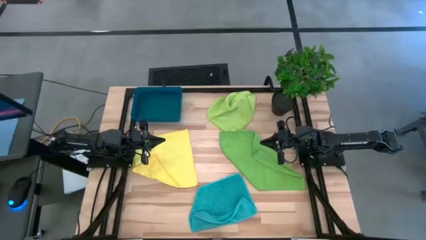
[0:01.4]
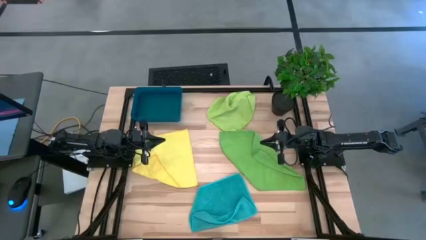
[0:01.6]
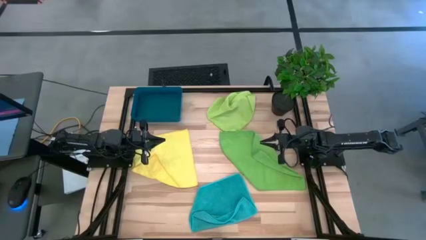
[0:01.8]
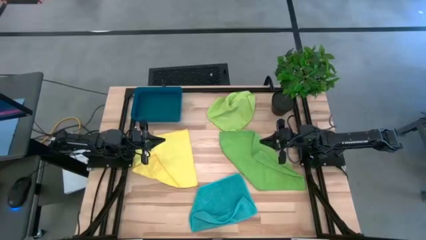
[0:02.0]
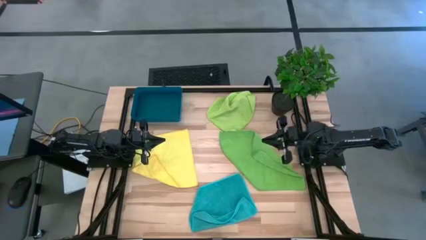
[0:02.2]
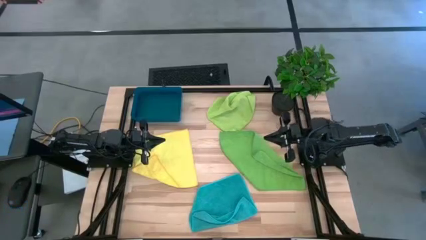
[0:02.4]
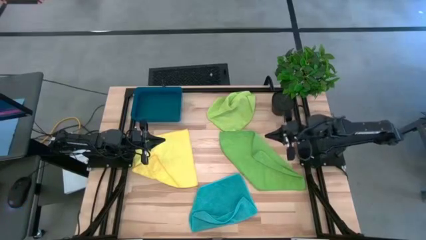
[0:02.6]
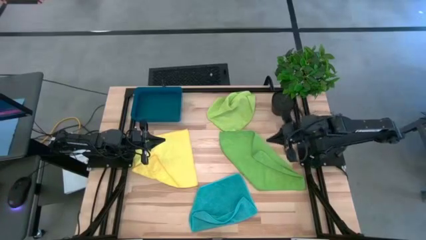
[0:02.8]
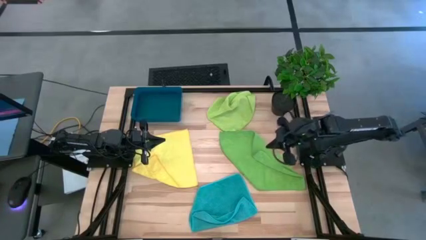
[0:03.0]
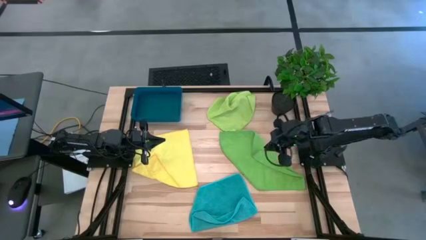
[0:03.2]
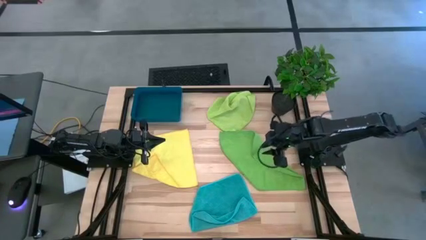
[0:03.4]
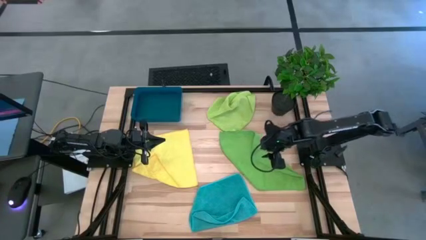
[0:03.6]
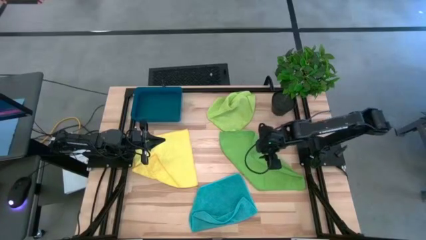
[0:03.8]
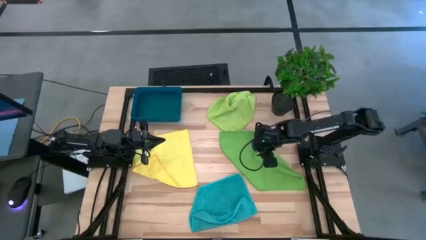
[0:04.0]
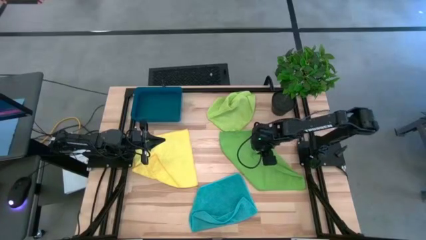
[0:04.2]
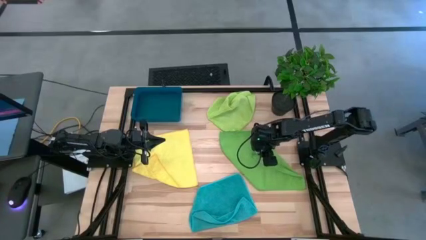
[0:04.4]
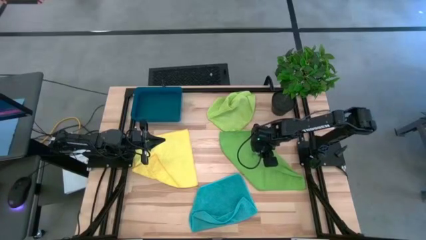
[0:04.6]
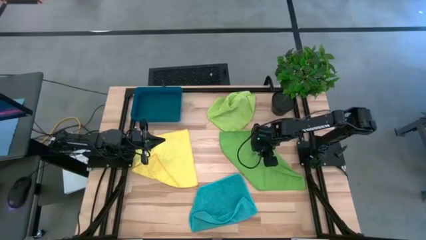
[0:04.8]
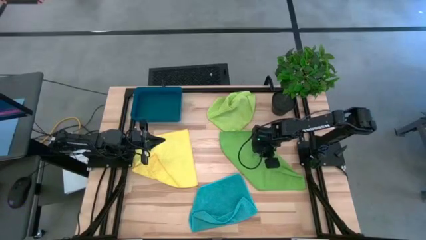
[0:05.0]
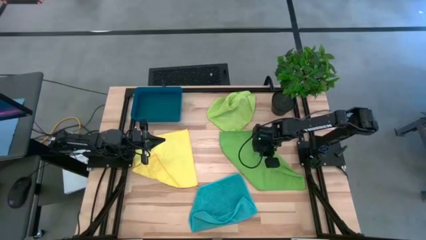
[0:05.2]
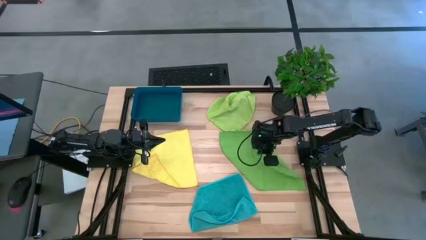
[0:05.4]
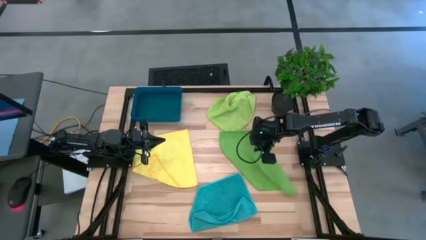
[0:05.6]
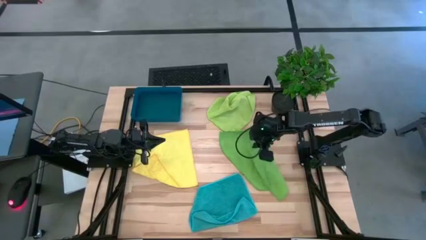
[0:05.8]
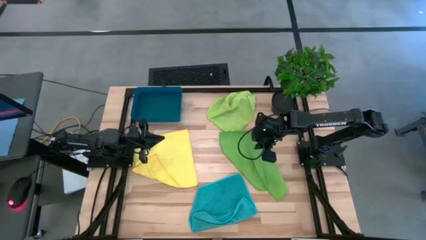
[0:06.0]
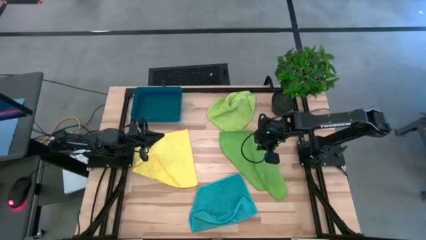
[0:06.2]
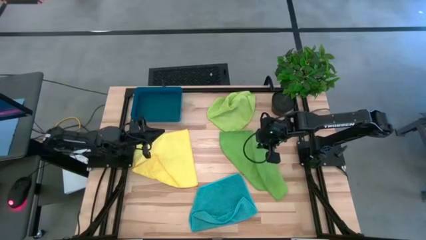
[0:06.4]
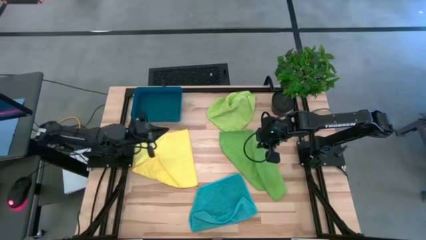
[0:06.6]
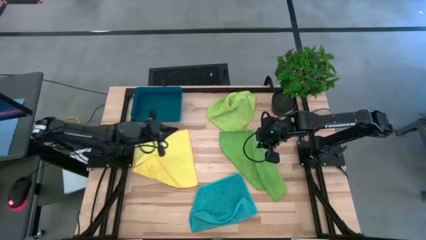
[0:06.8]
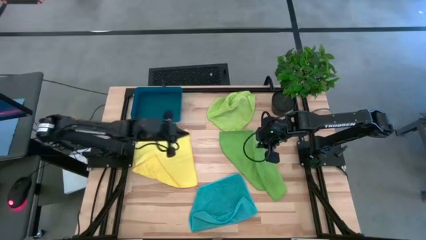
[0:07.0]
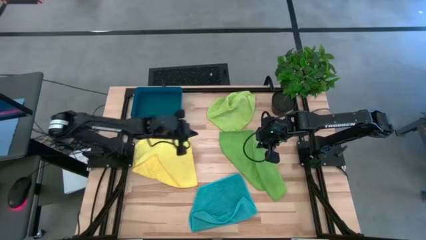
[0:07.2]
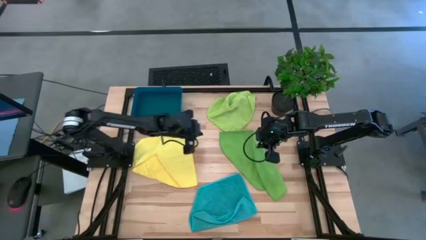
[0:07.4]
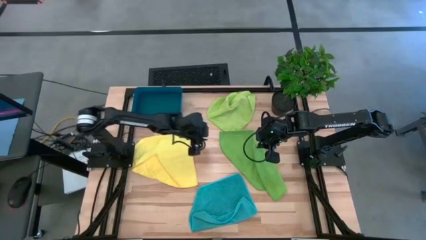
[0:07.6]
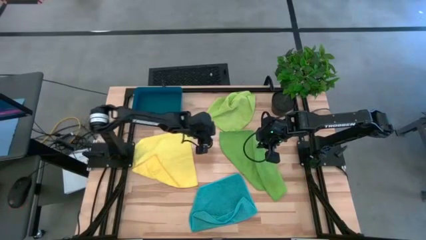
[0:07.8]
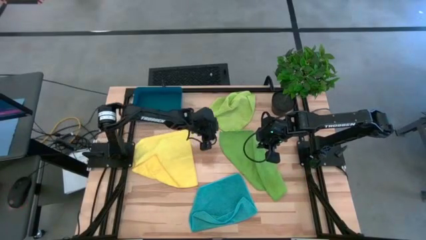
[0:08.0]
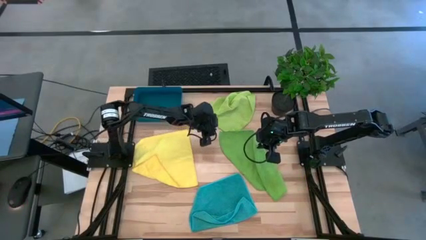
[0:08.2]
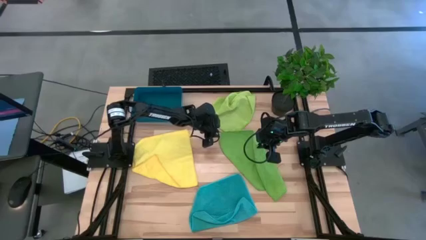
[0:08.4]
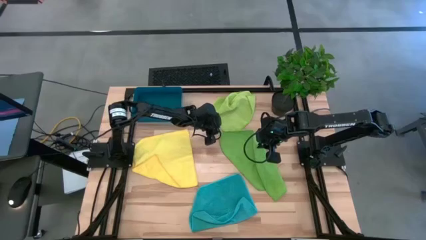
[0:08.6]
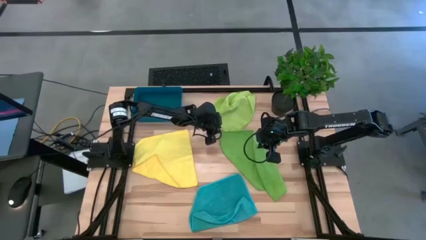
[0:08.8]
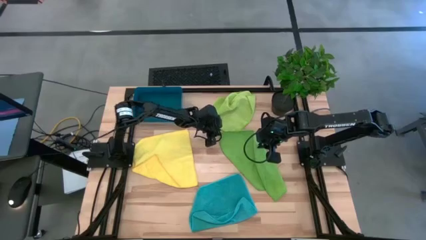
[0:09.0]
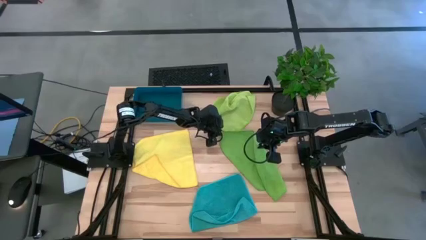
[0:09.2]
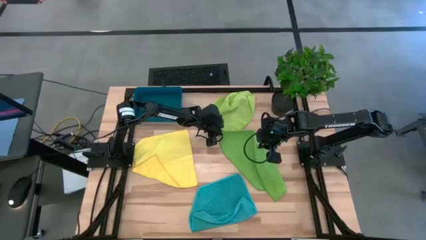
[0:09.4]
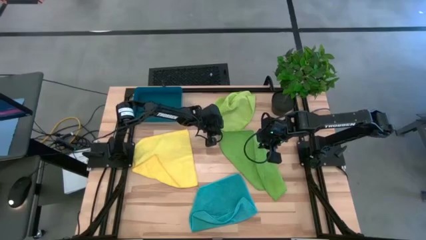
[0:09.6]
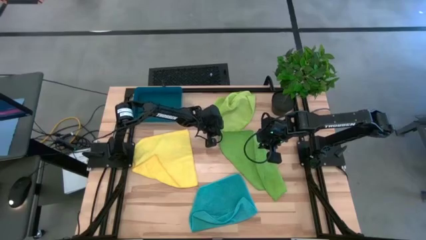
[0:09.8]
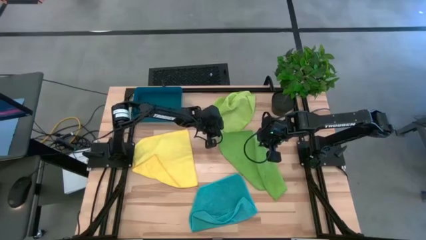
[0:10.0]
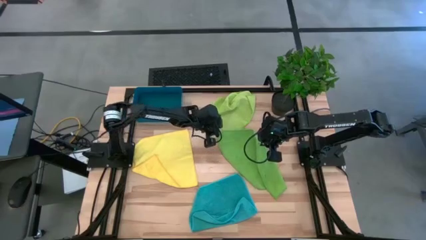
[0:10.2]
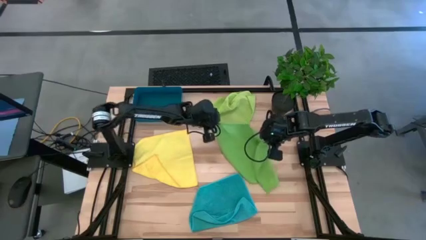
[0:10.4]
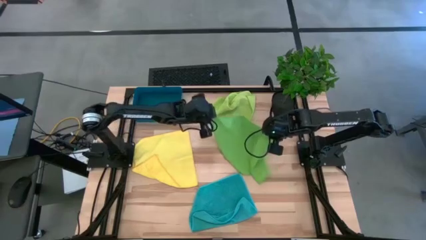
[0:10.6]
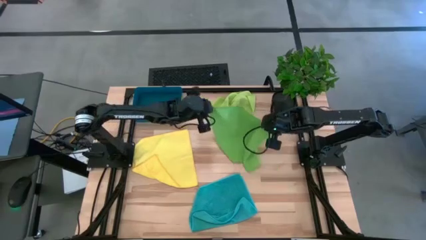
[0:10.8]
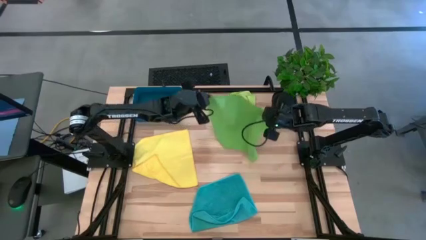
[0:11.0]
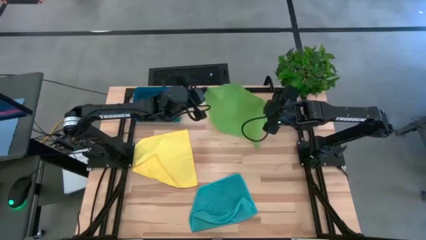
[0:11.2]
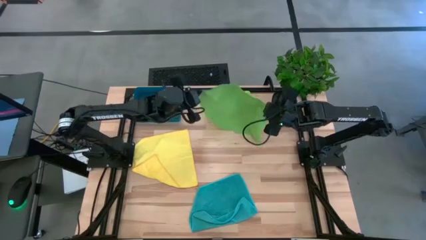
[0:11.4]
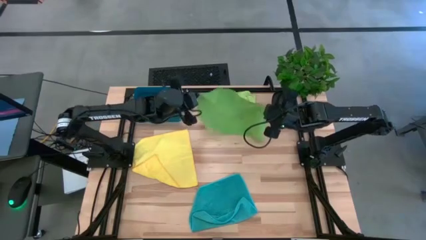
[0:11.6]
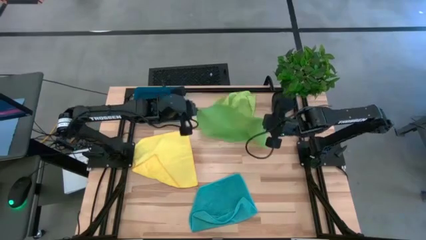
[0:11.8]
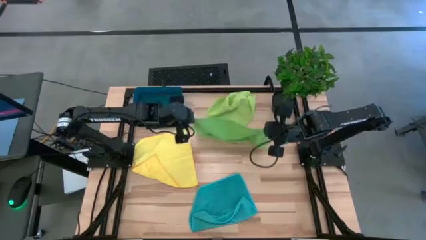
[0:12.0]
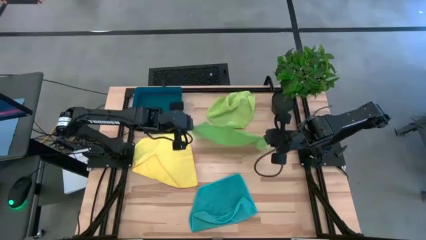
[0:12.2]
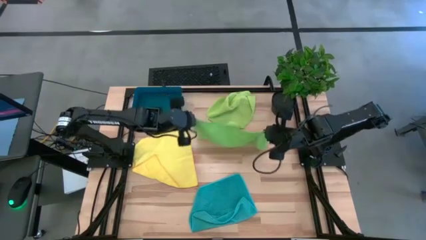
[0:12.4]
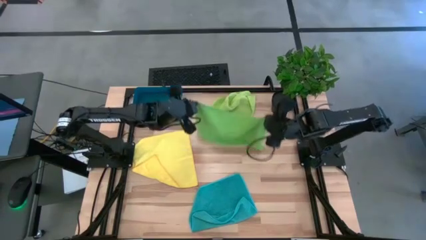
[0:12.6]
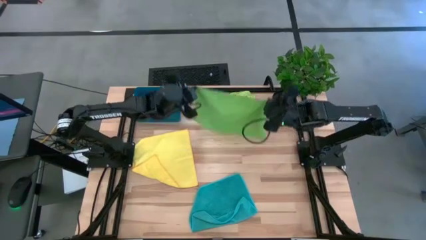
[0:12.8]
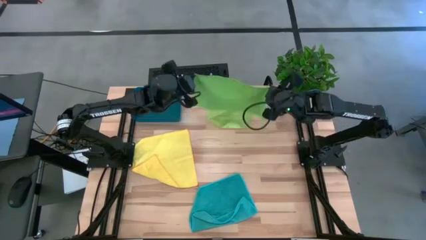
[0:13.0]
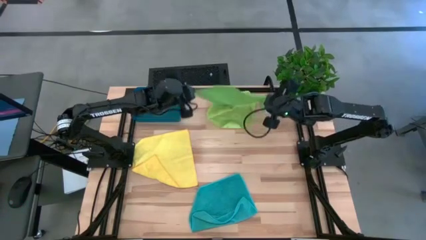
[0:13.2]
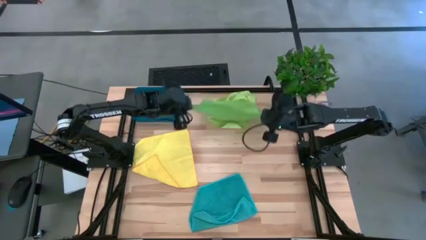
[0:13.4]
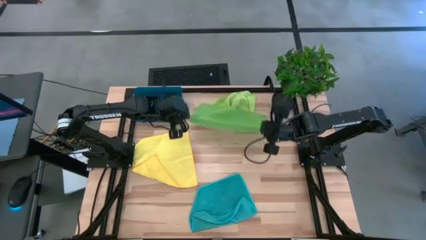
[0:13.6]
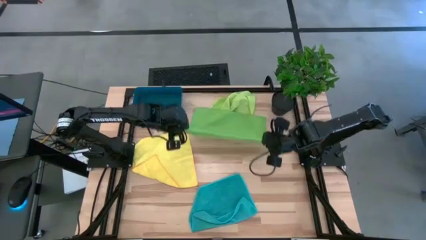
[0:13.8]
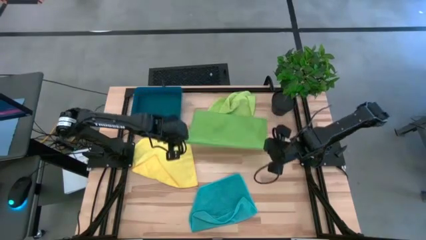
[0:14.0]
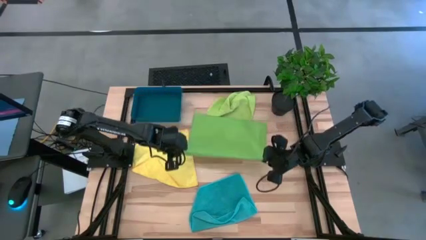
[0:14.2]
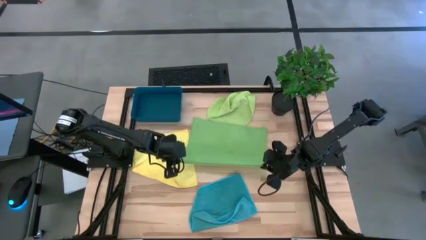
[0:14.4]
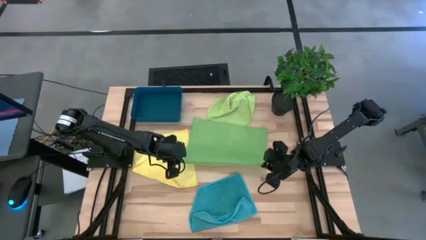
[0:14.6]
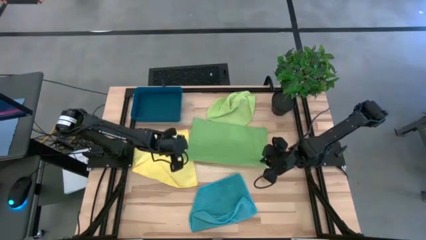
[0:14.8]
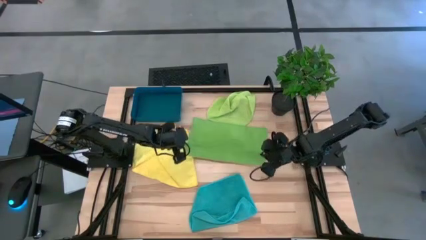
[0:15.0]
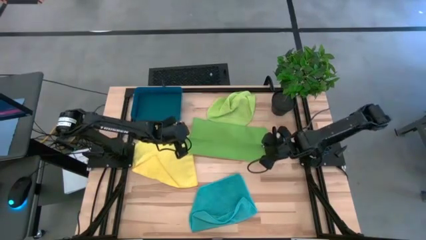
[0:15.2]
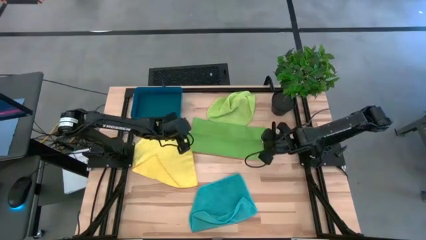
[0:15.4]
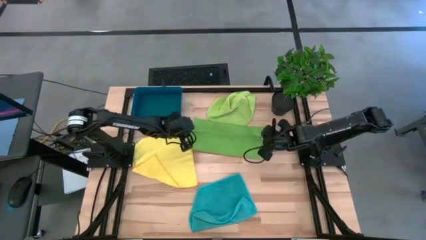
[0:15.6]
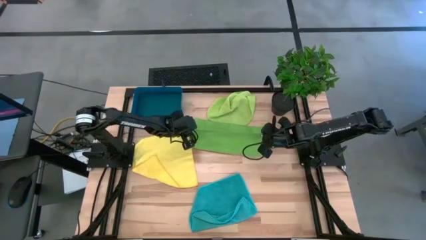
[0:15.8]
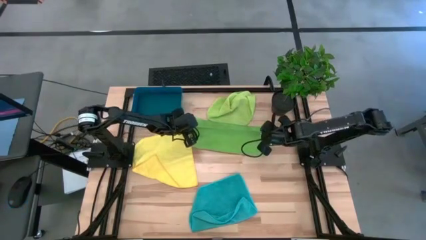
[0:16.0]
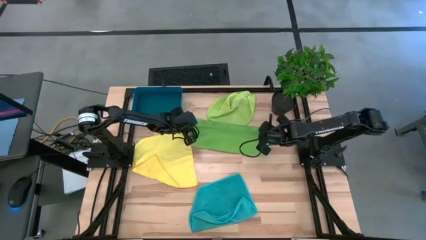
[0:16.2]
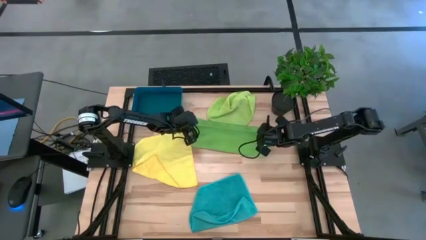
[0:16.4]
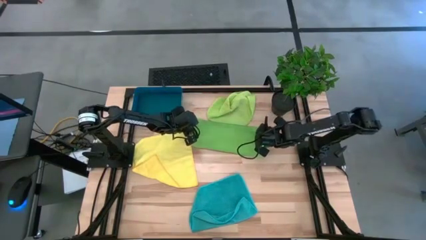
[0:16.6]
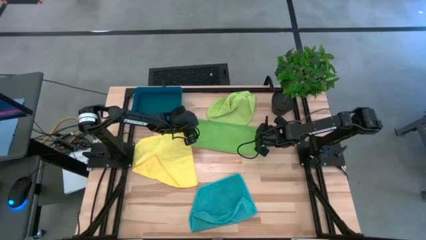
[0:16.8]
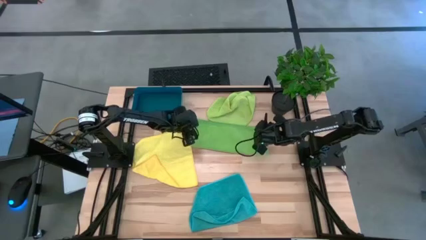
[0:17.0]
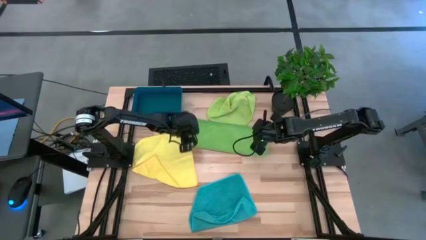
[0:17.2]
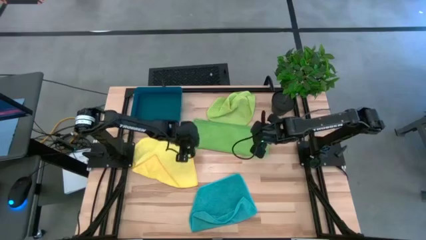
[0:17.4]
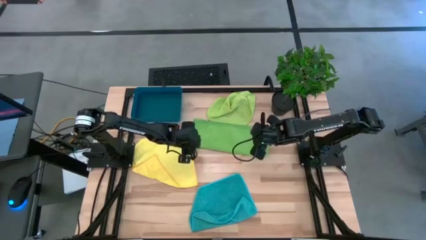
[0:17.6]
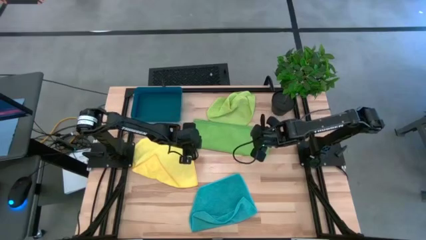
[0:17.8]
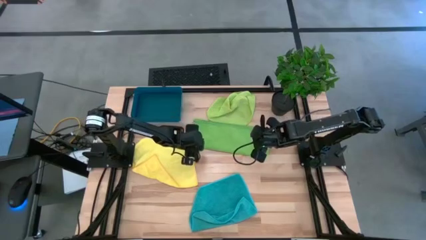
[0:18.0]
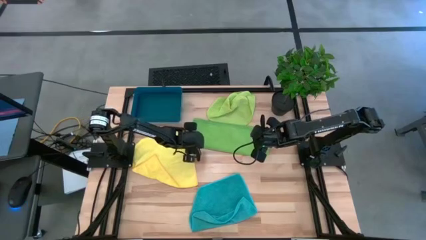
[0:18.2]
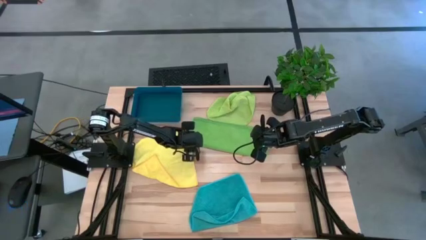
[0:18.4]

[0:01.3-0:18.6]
Task: Fold microfiber towels
Fold the green towel
